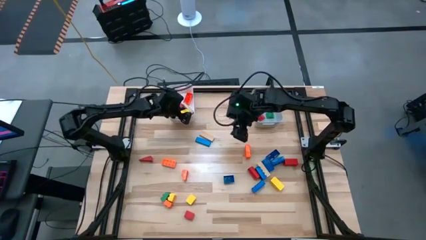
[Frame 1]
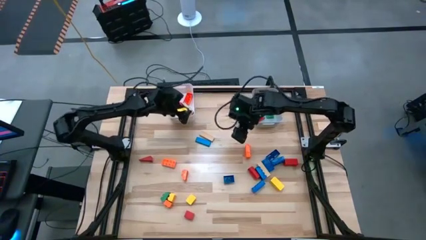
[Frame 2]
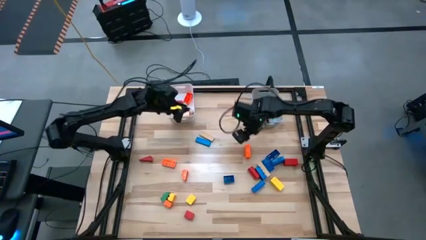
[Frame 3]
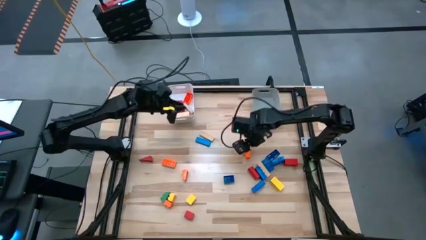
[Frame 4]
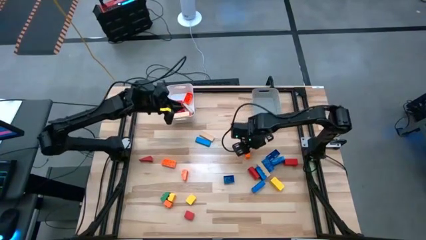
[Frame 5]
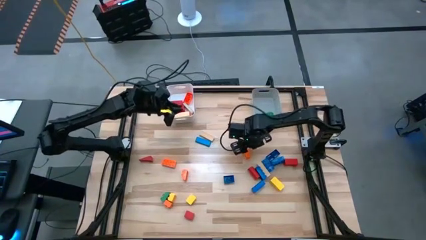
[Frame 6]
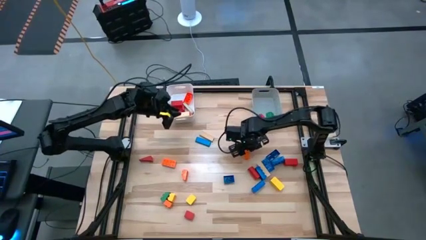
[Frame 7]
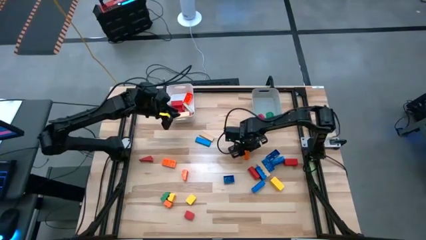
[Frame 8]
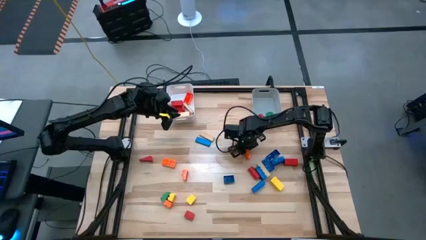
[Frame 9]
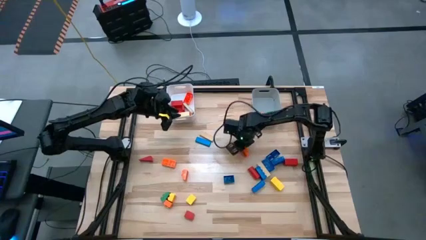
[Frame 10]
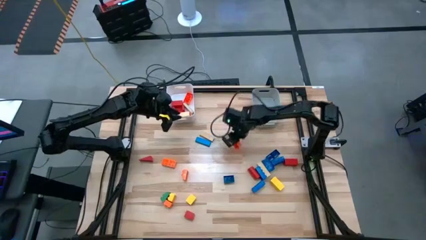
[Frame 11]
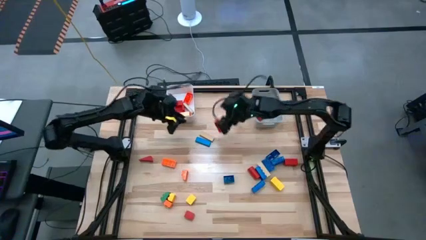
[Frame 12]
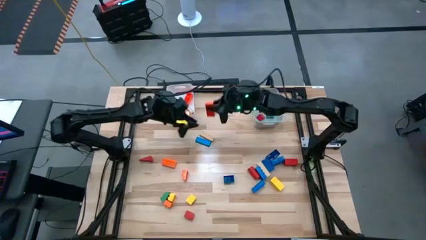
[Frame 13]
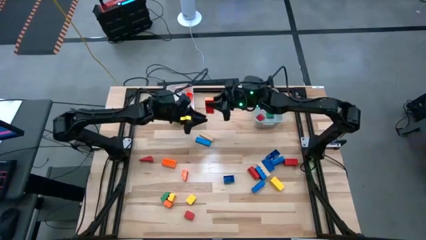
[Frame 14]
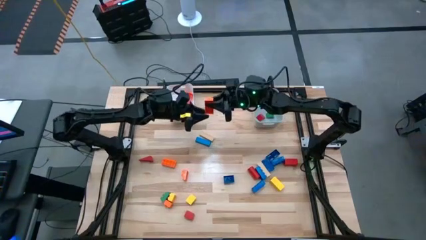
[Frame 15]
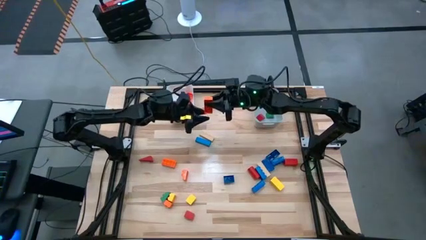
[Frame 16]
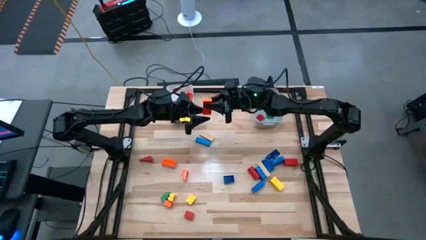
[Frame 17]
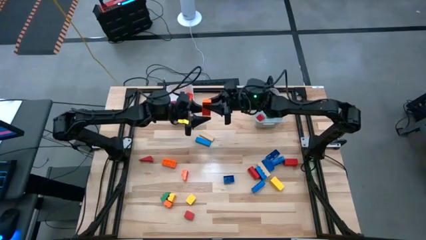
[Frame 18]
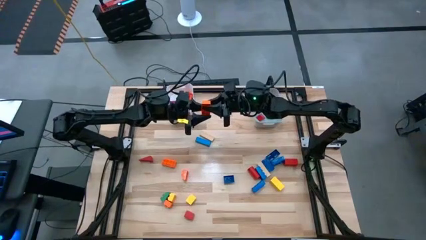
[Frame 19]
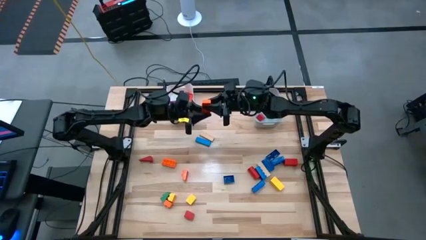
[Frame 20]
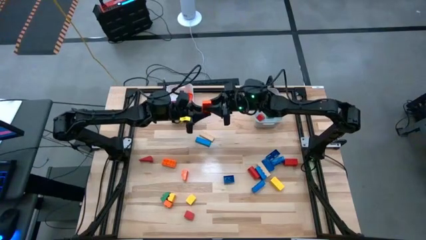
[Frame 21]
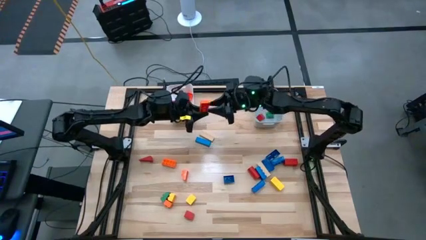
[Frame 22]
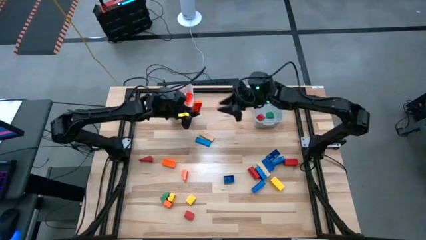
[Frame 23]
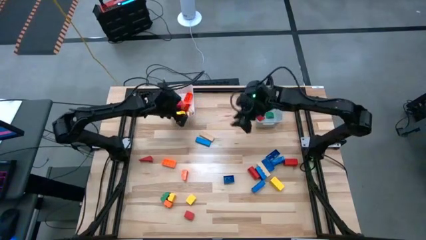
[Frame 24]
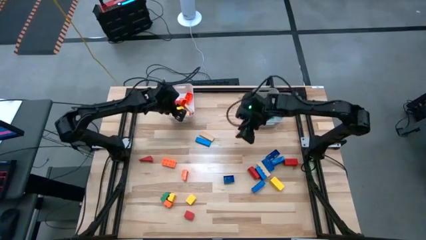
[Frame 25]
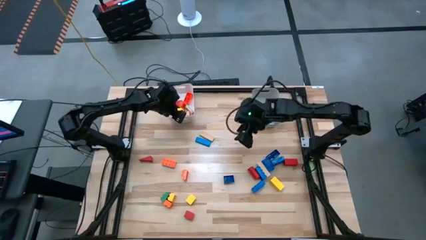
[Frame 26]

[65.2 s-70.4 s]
Task: Sort blocks by size
Put the orange rectangle game piece into the white bin

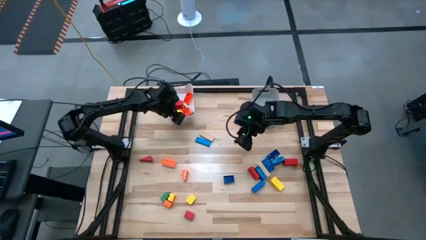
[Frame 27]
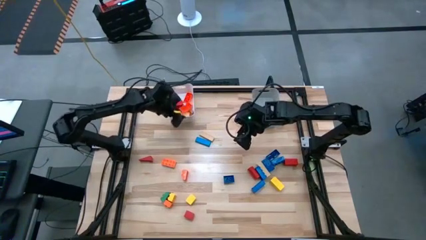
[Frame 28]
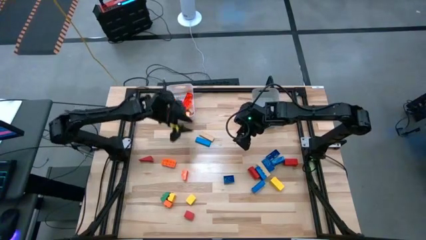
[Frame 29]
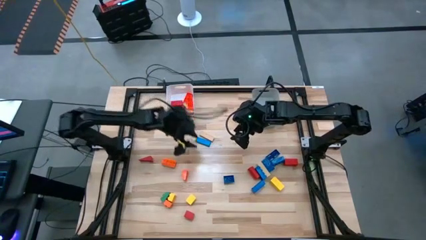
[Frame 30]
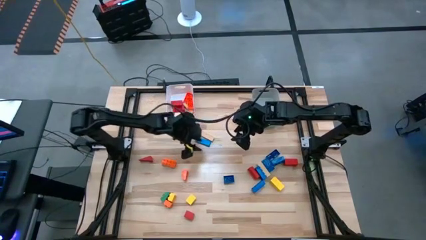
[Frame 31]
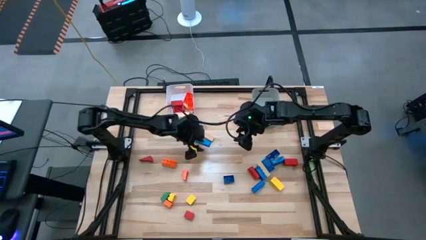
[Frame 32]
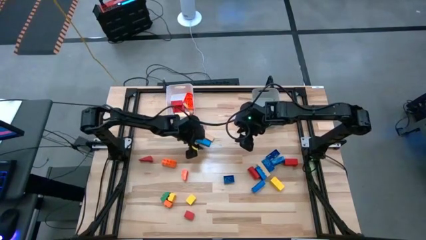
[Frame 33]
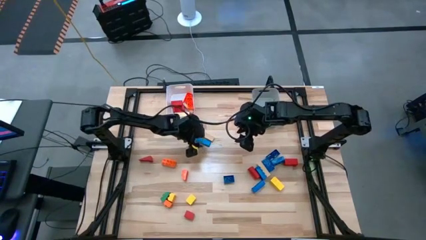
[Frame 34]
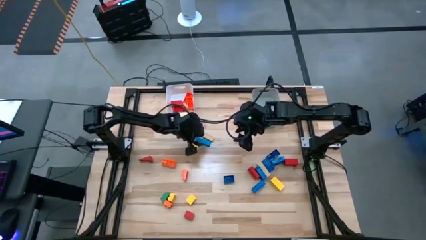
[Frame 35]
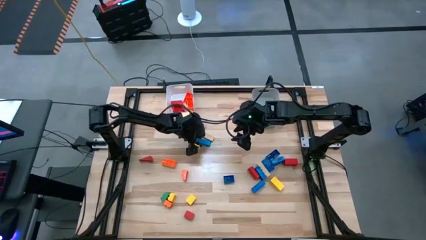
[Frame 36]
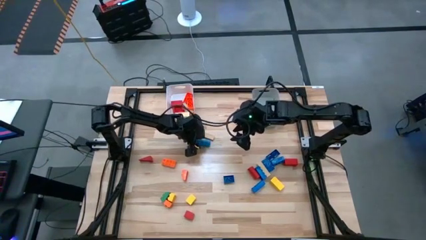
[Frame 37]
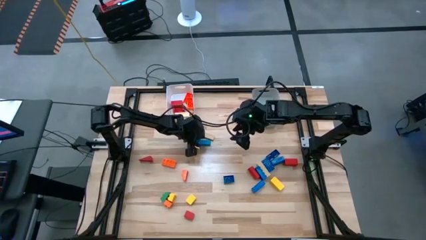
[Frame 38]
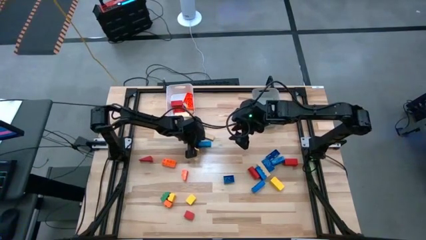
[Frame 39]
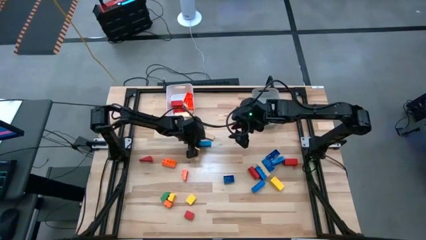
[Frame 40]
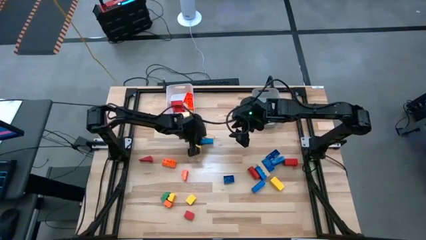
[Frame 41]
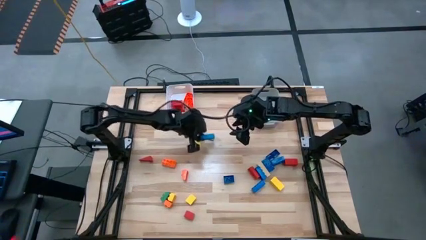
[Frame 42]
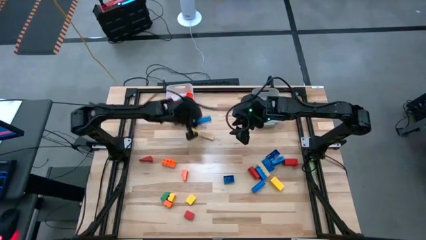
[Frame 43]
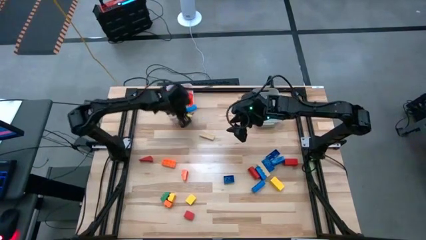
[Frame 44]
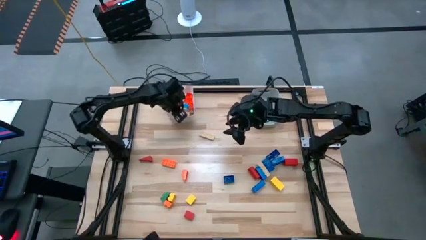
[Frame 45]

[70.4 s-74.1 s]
Put the blue rectangle wooden block into the white bin

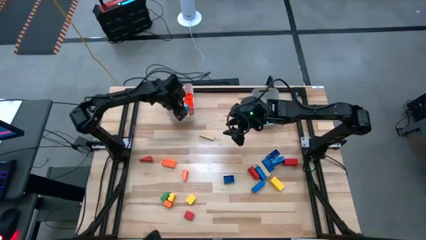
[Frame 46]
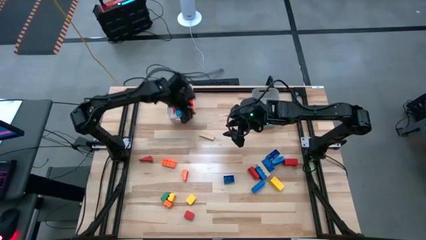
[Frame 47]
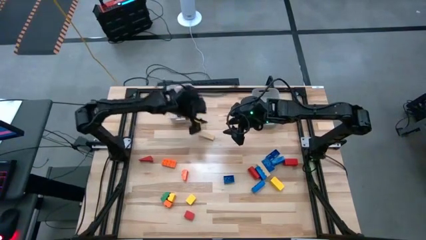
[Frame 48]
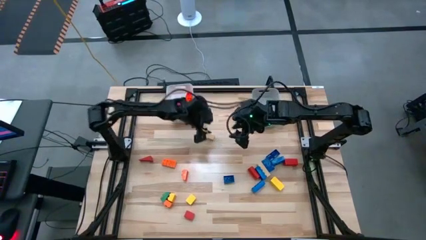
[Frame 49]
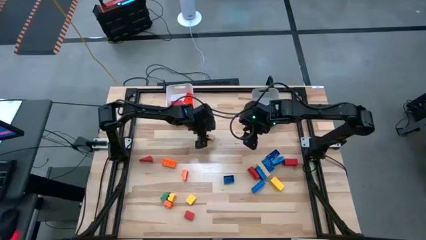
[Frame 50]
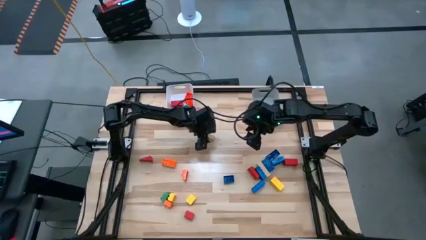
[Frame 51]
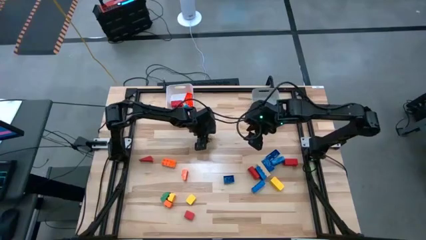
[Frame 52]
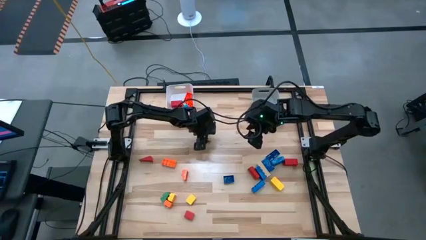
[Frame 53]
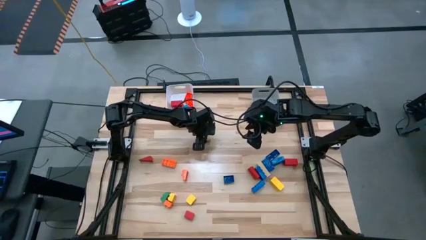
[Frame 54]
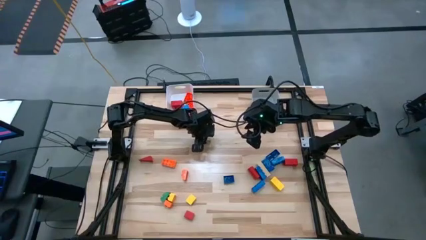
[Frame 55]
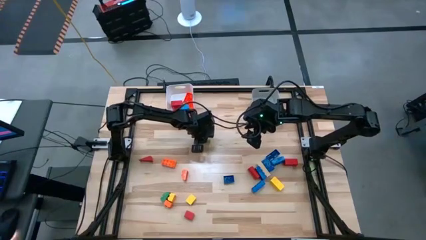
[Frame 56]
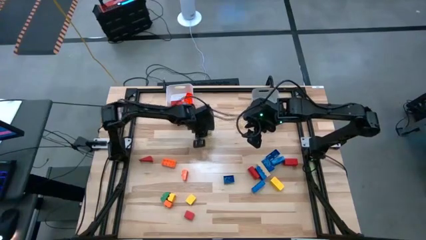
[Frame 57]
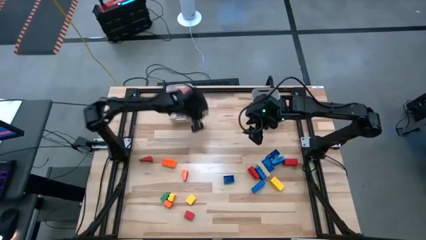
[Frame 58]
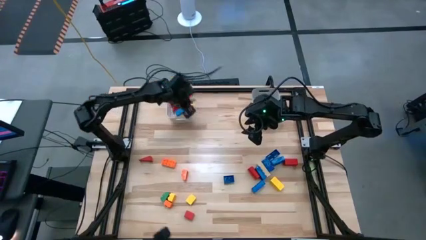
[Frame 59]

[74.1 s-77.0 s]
Put the light brown rectangle wooden block into the white bin

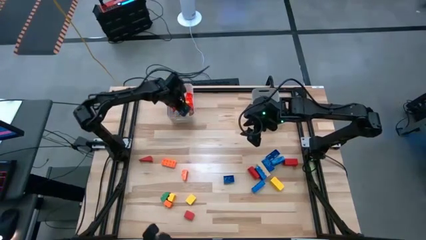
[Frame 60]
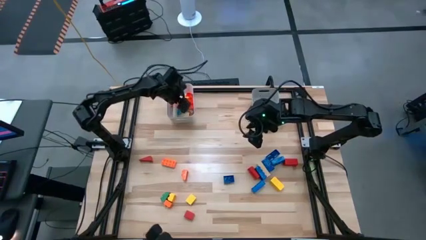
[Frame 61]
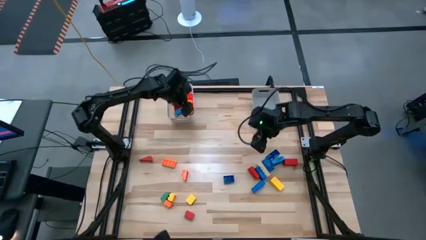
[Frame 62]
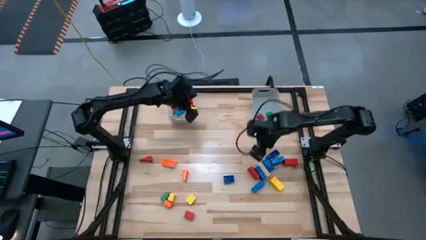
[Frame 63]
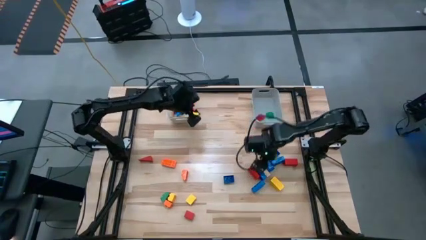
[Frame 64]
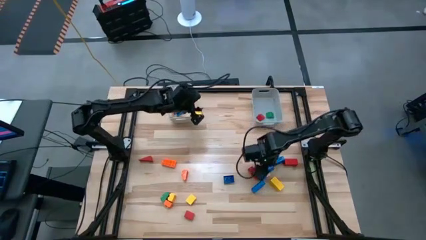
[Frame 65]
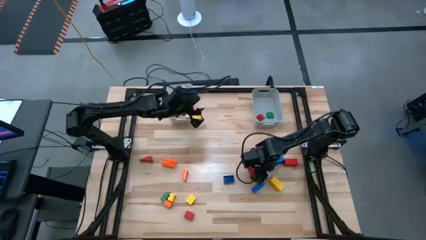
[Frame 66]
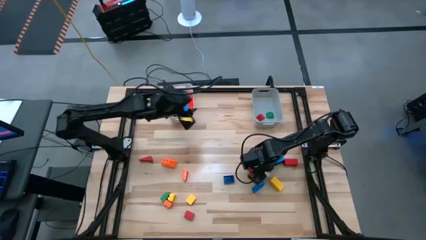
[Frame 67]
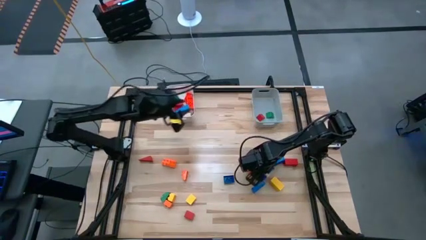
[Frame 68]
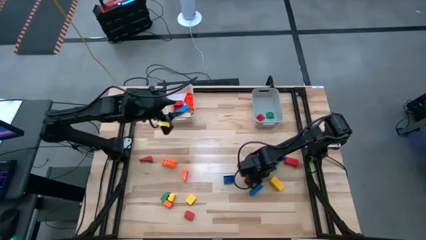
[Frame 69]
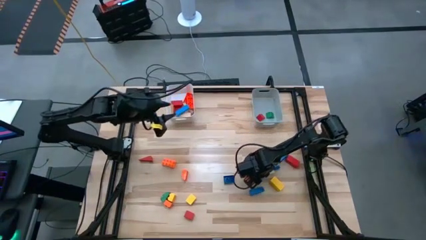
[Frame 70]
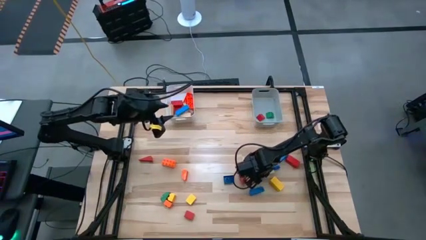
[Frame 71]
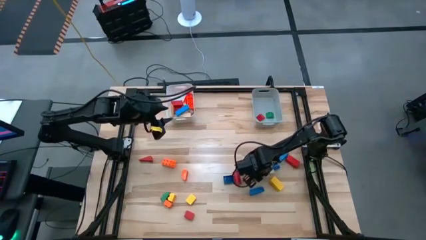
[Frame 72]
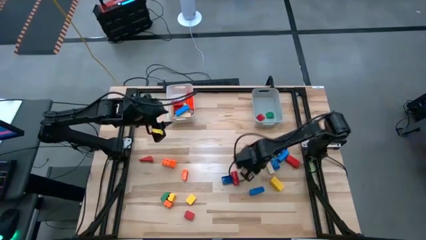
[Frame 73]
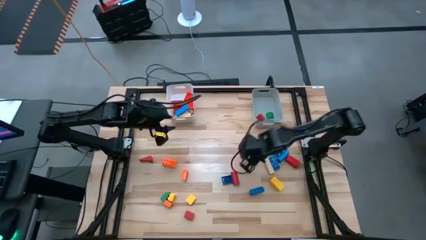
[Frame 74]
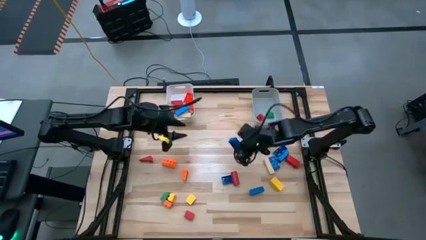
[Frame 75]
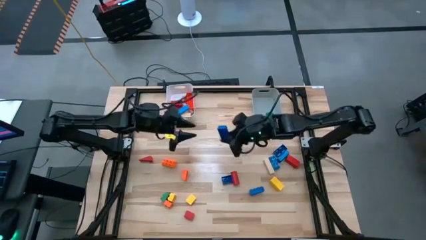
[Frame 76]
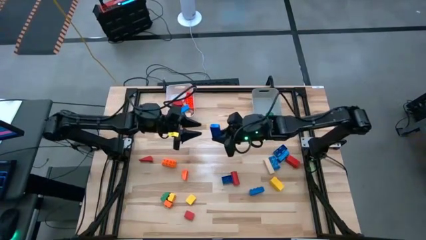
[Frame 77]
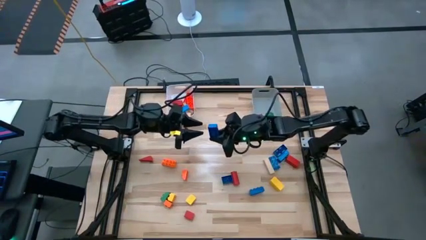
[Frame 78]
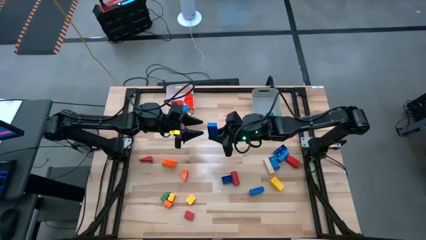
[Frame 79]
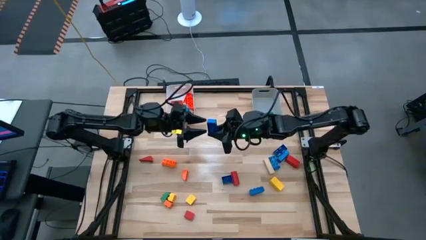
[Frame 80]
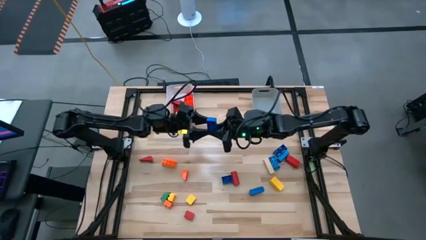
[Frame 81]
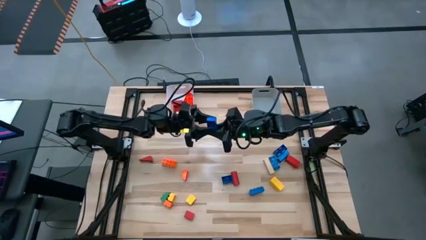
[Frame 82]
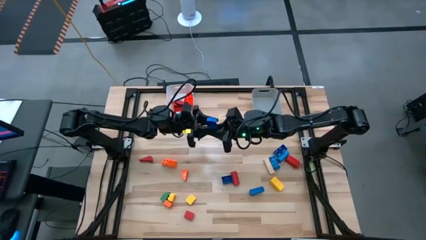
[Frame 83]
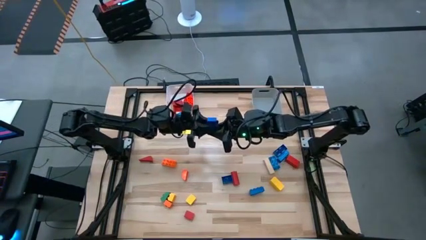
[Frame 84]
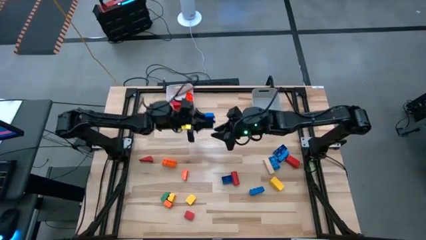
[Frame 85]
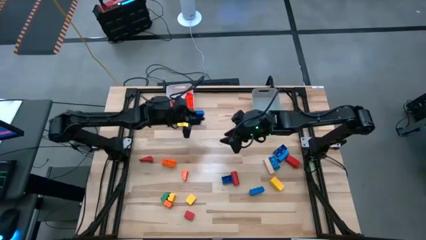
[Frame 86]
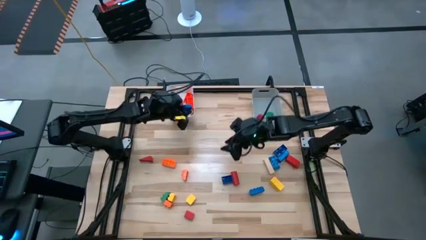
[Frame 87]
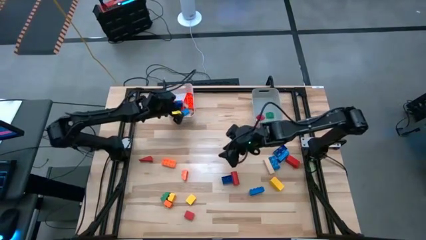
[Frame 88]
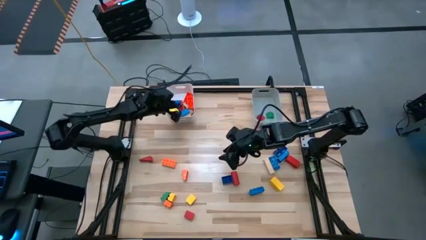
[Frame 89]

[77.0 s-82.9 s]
Put the blue rectangle game piece into the white bin
